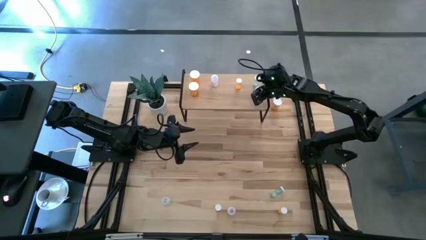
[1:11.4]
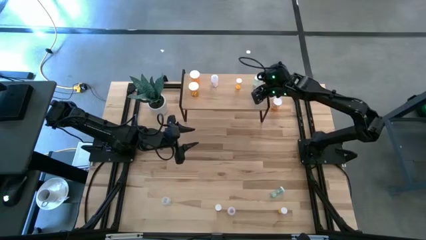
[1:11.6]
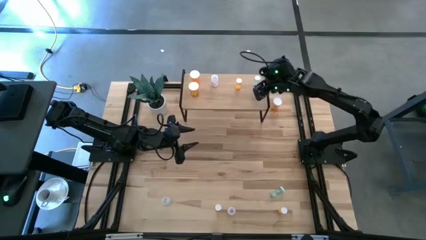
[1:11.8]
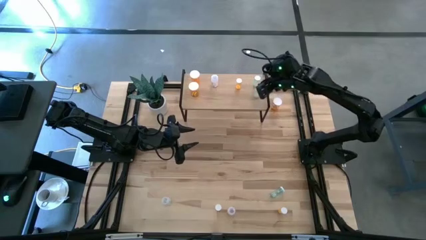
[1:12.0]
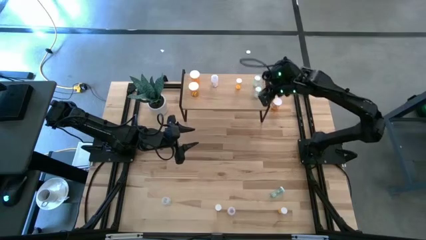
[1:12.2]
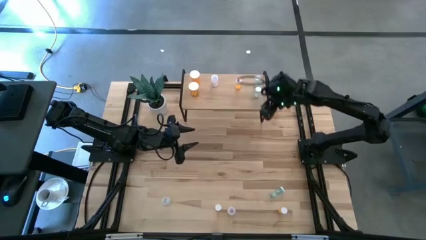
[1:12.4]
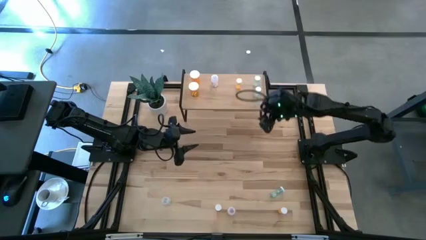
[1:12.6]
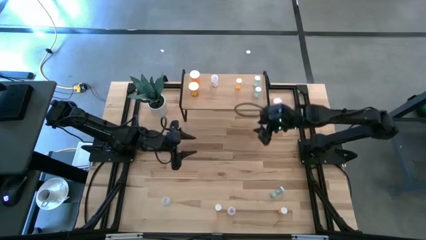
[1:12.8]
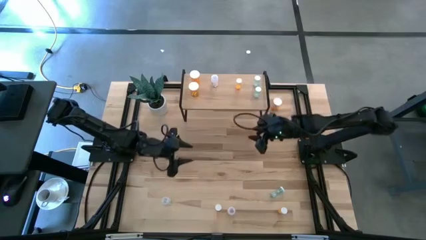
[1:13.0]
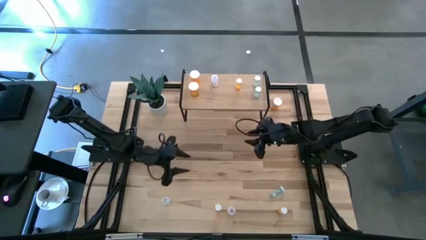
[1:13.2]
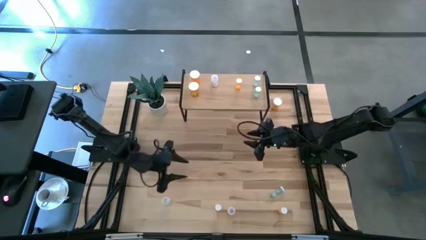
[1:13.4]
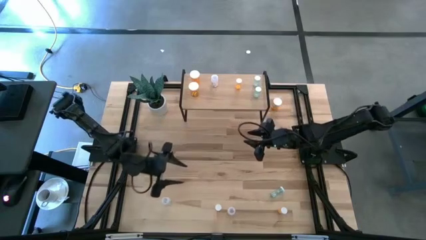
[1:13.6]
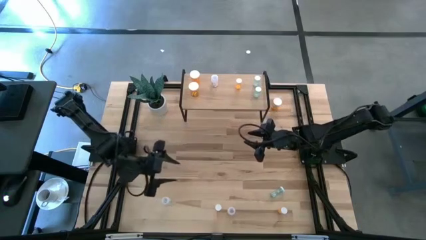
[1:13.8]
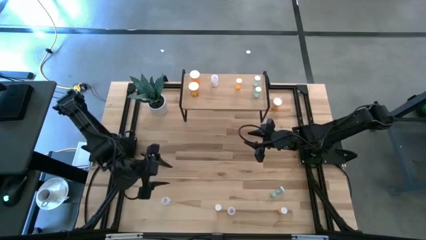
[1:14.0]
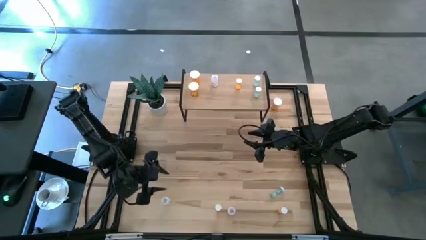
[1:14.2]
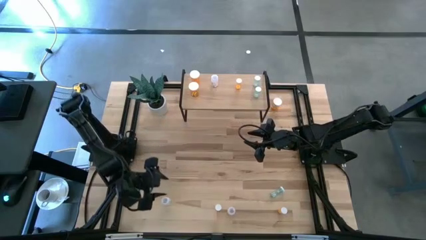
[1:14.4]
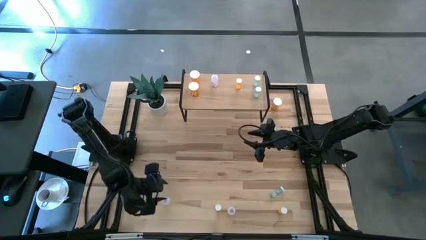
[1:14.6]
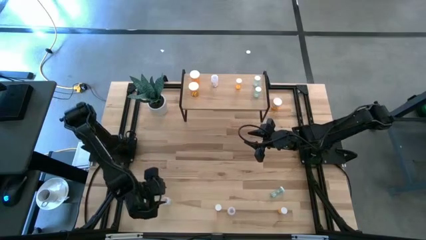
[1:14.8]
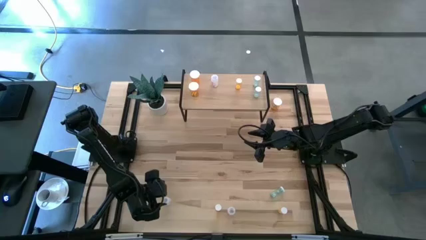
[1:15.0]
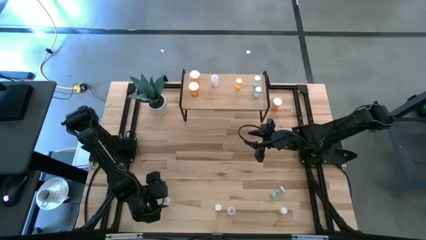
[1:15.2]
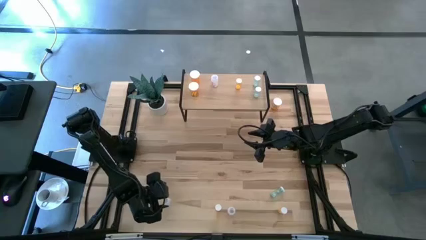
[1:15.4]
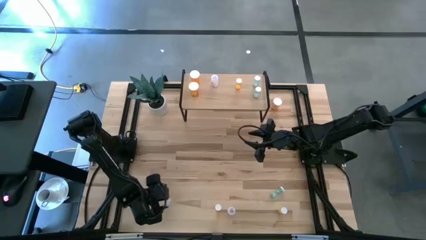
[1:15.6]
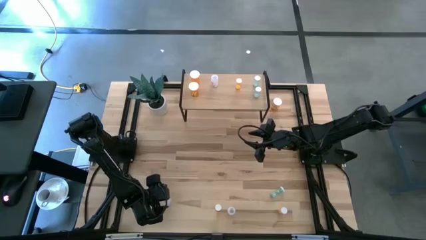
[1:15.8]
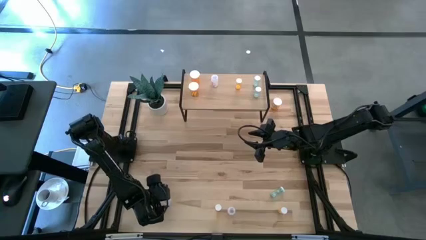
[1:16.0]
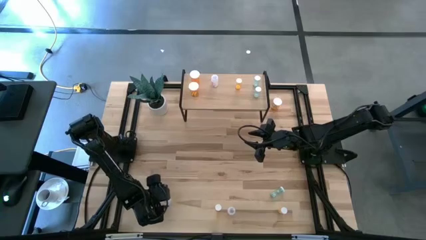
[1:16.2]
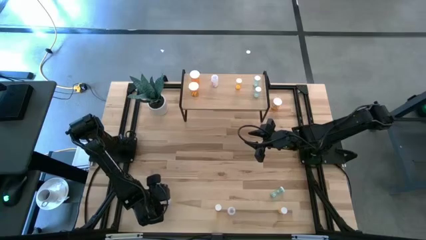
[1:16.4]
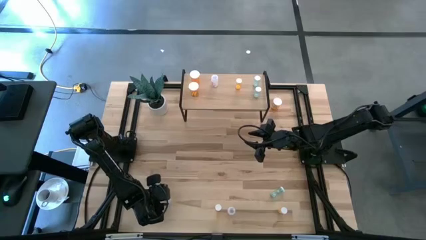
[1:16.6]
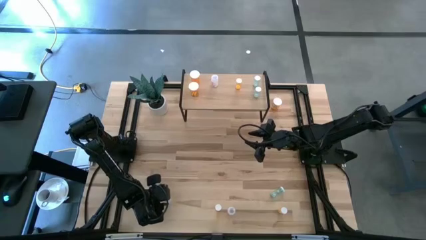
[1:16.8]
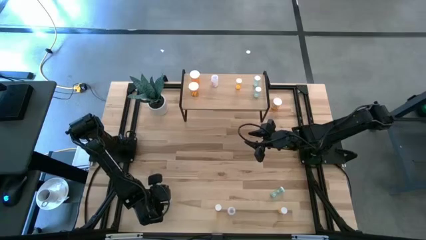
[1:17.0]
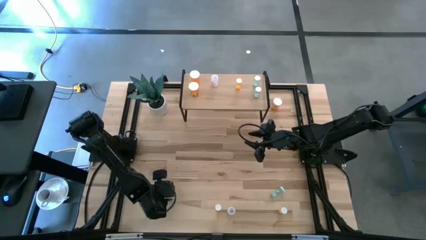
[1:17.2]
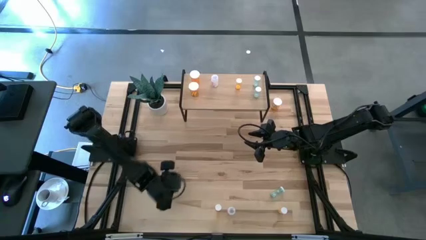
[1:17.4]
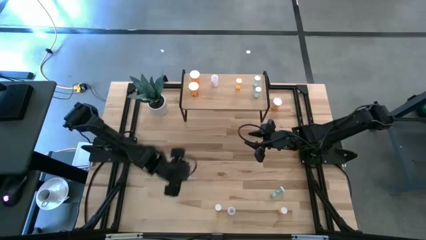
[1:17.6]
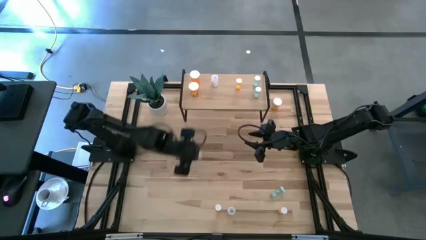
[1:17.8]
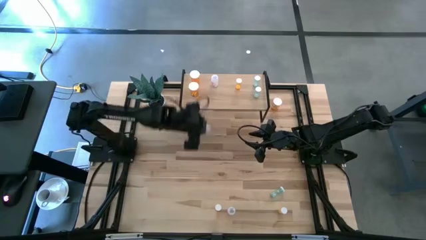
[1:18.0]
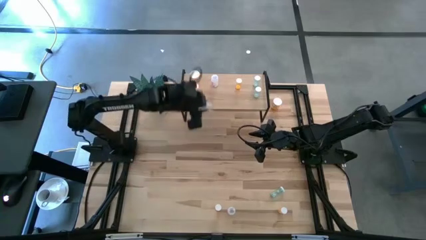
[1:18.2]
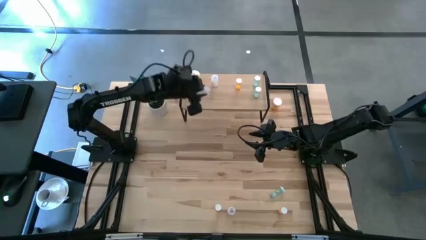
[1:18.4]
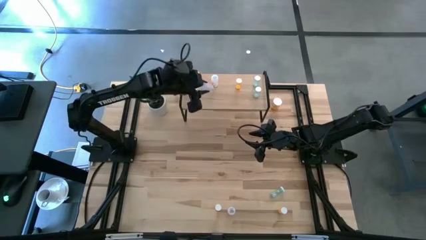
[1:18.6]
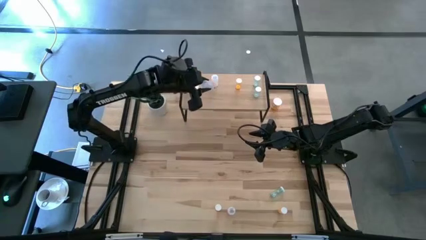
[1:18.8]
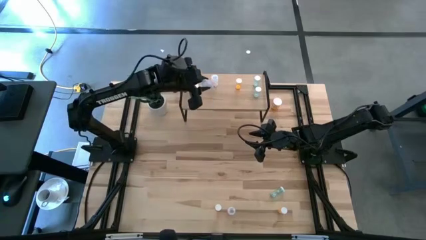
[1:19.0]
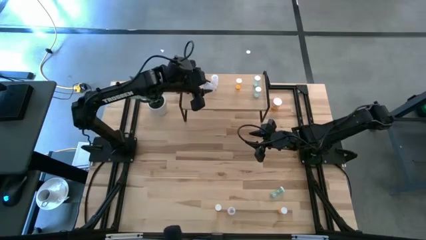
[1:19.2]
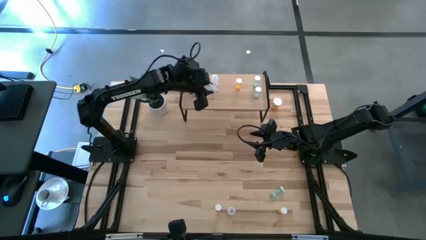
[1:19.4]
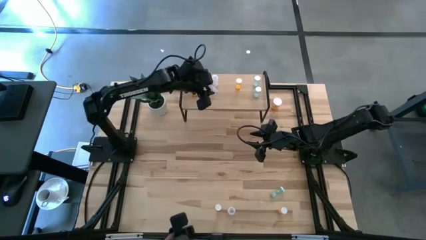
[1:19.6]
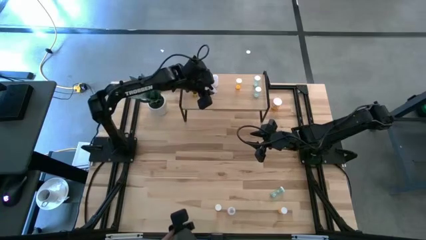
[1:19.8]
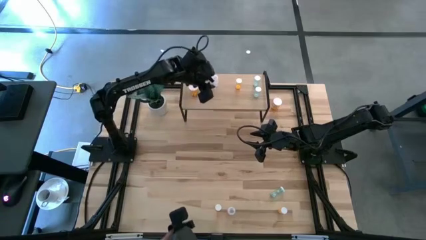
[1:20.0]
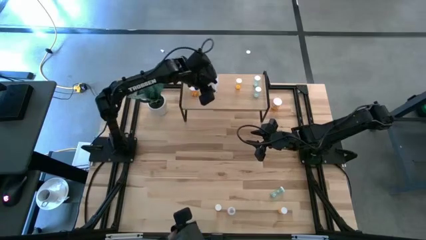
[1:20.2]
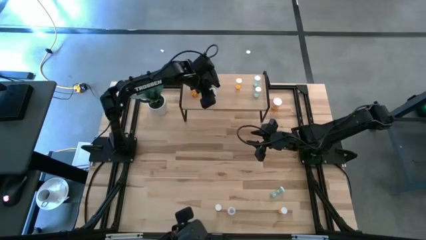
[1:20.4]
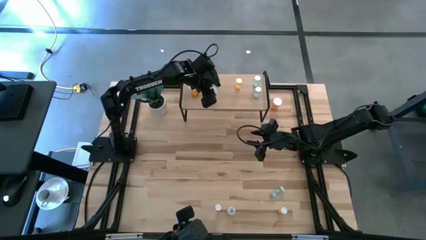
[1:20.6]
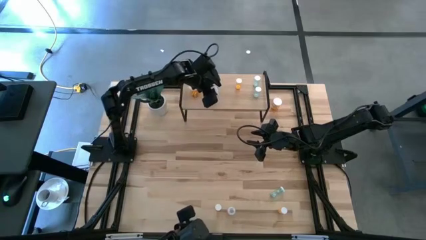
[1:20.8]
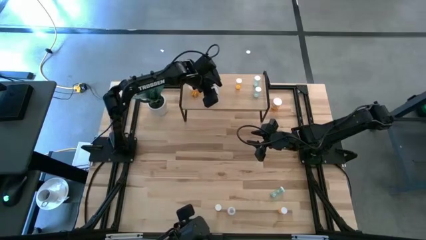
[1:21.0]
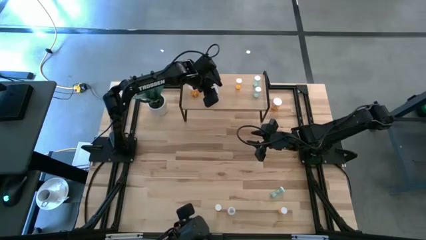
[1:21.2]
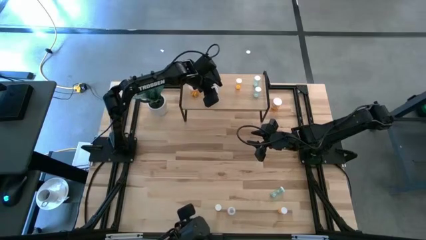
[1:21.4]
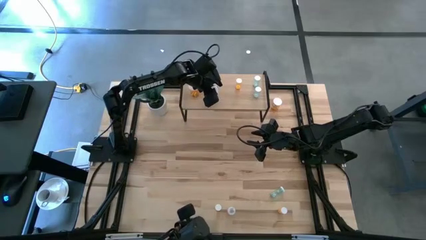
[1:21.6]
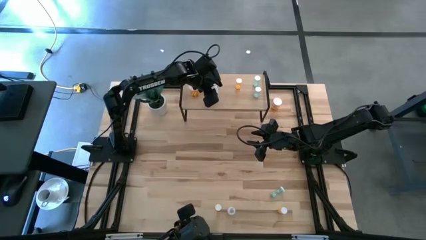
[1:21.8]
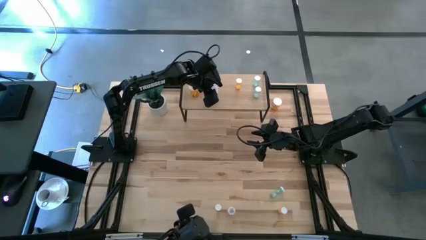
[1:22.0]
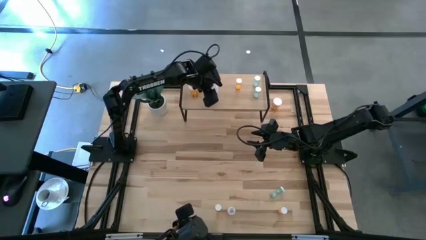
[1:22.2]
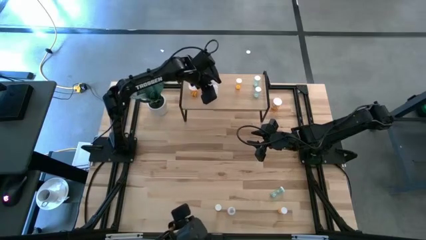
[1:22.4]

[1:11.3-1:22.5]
Task: Pick and place medicine bottles onto shelf by color
Put the left transparent pill bottle aligned with the other transparent pill bottle on the shelf
